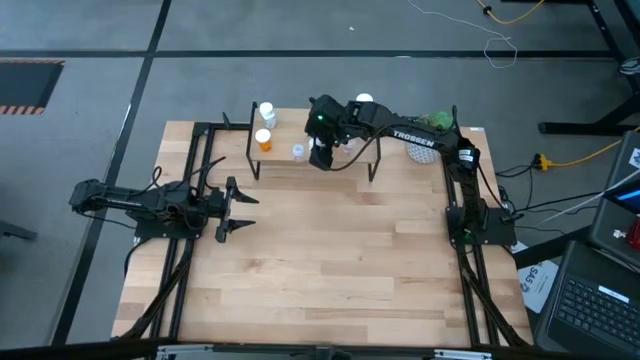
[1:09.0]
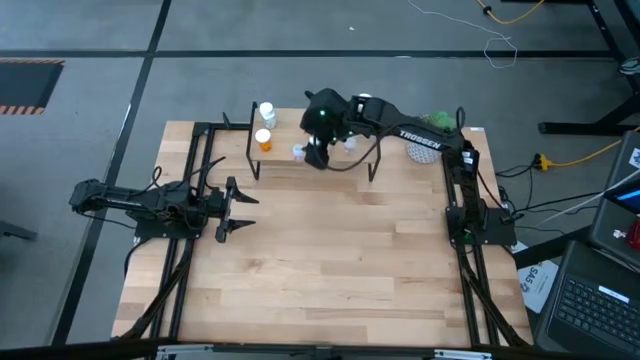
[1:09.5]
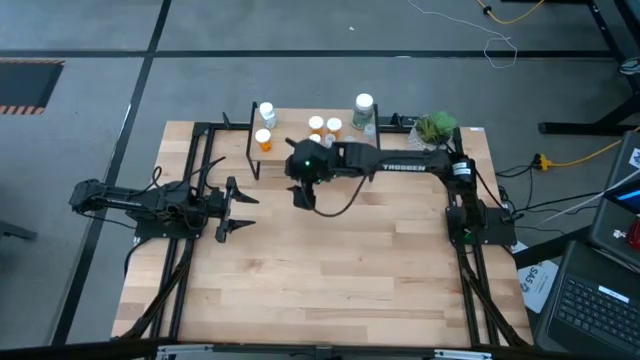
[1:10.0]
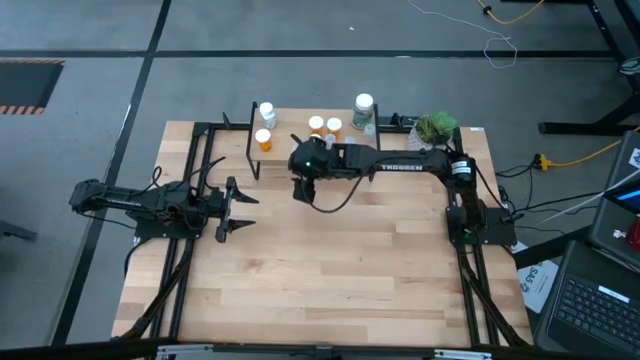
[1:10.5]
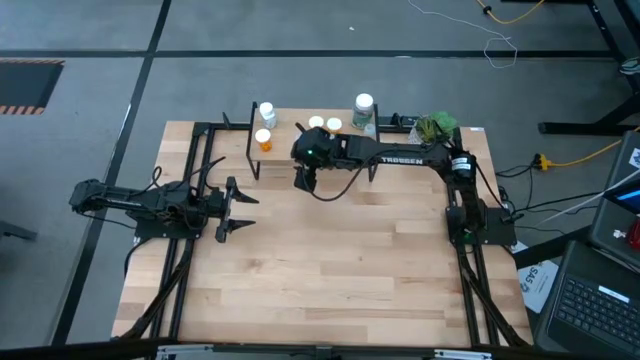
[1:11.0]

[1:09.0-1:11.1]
Task: Pick and place medicine bottles onto shelf by color
Adjust the transparent medicine bottle on the shelf

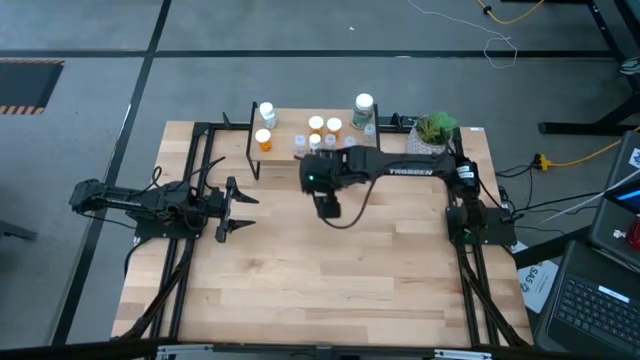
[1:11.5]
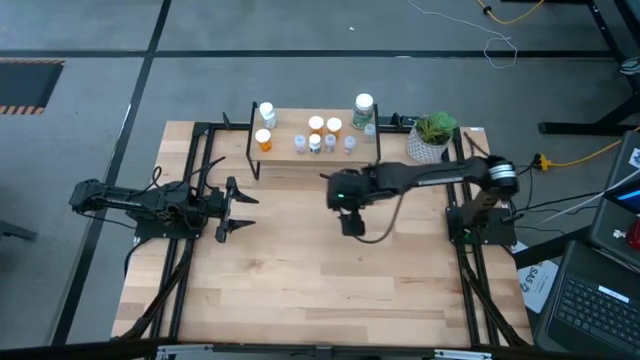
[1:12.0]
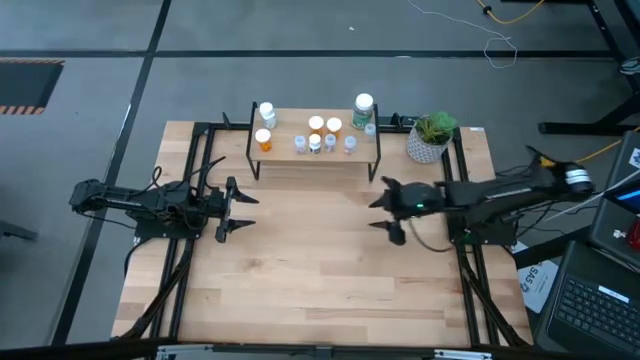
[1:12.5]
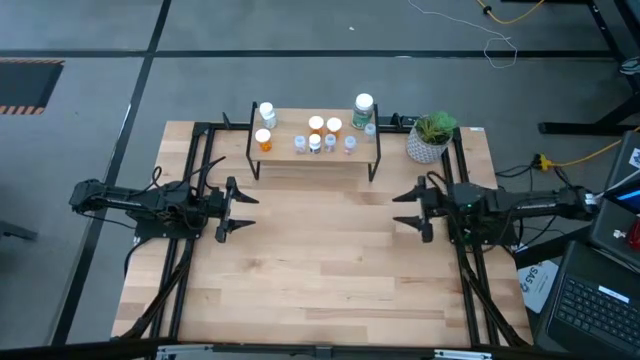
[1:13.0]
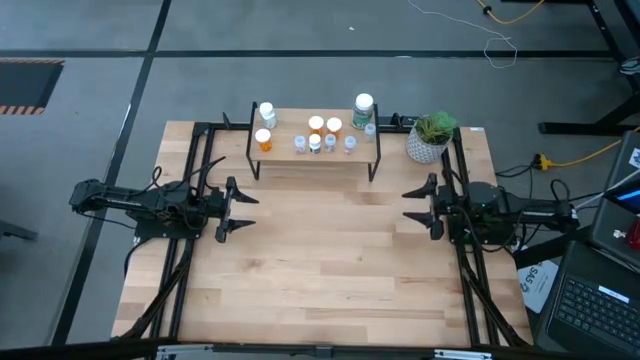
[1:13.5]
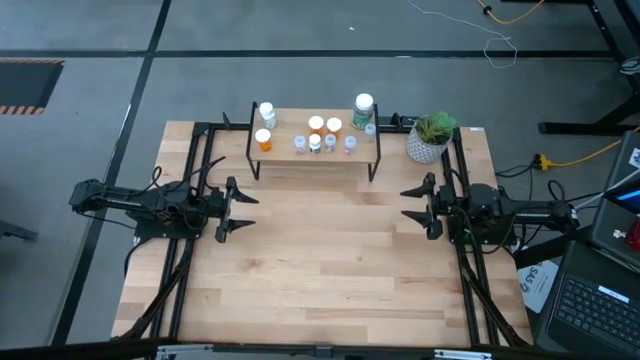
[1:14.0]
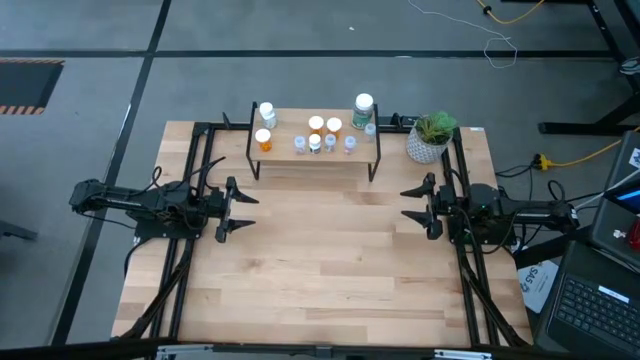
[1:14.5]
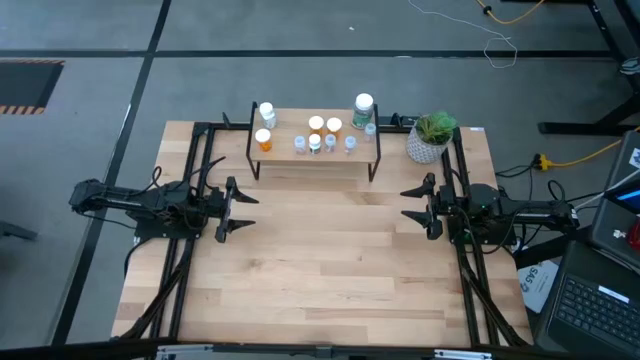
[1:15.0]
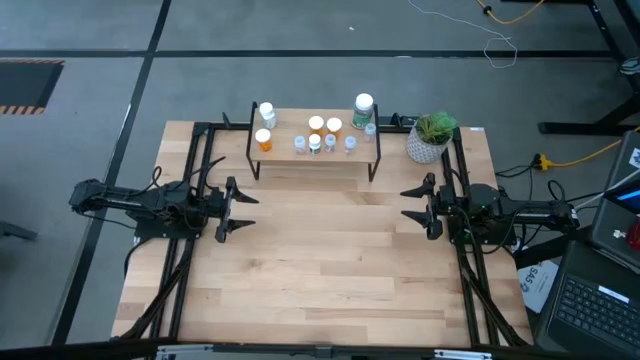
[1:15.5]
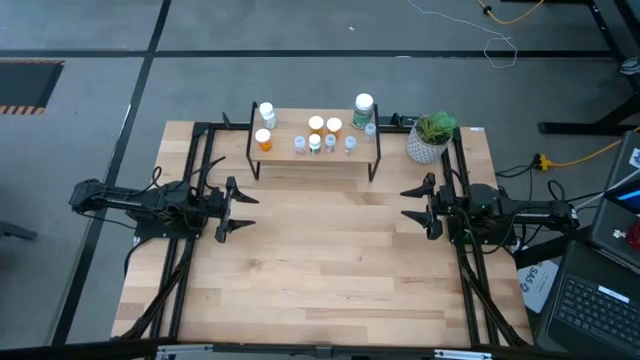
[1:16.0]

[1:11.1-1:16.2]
Return to Home Position

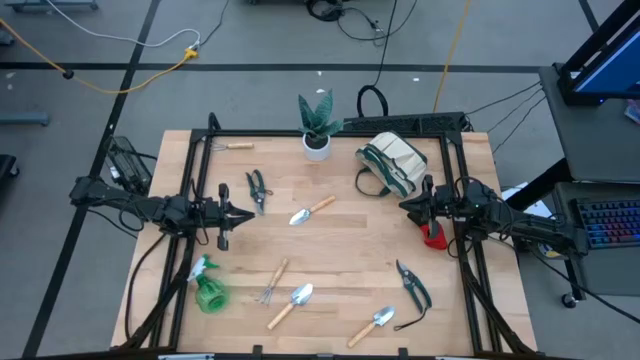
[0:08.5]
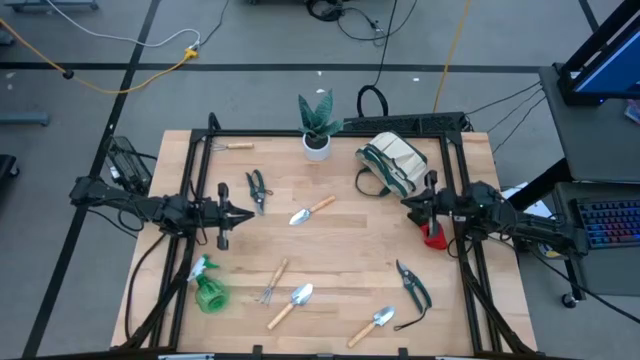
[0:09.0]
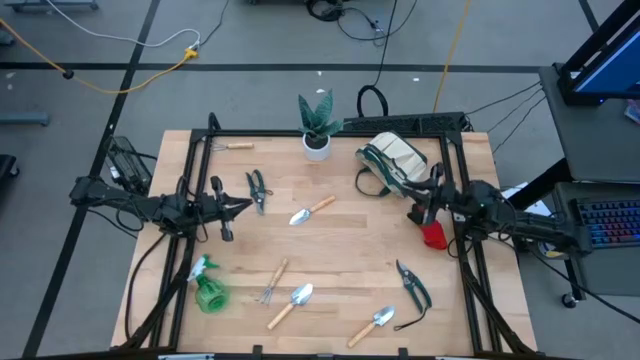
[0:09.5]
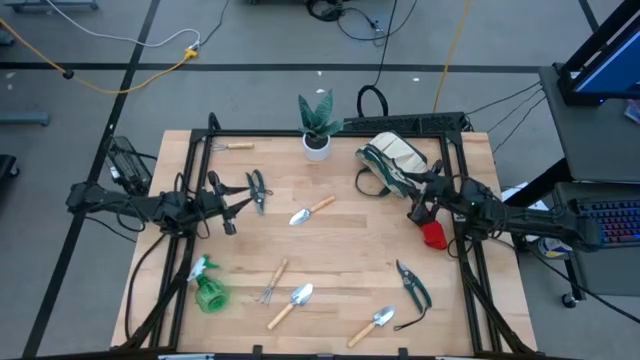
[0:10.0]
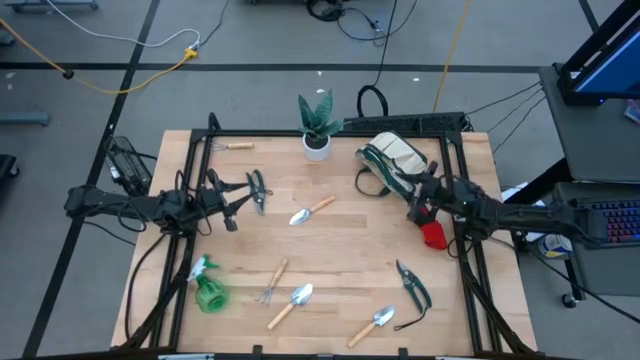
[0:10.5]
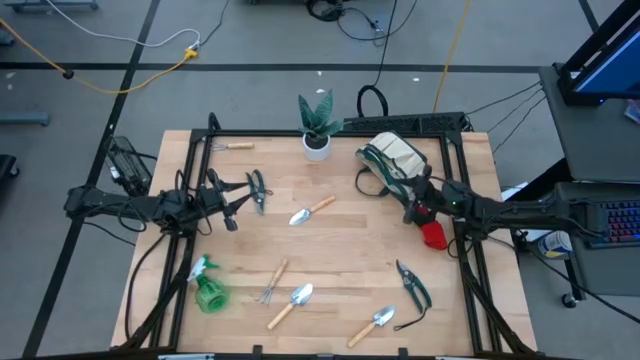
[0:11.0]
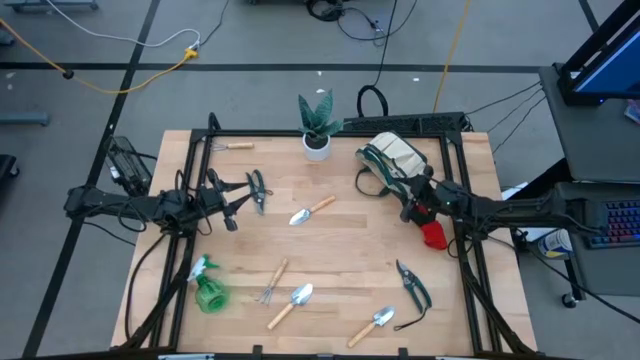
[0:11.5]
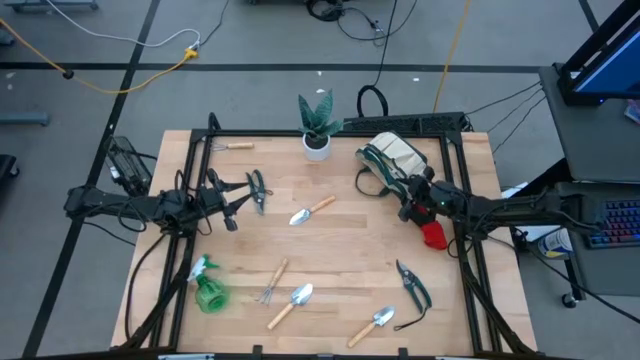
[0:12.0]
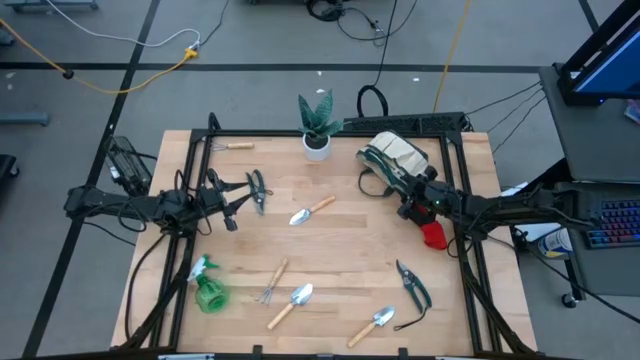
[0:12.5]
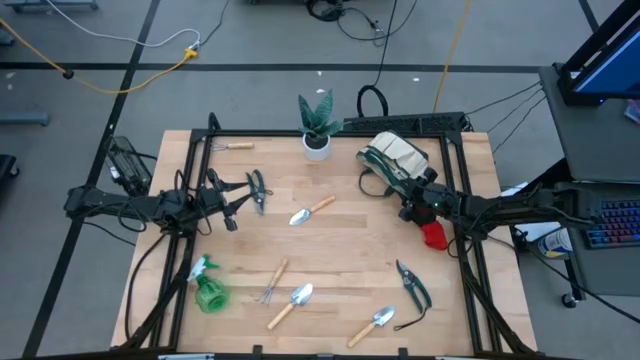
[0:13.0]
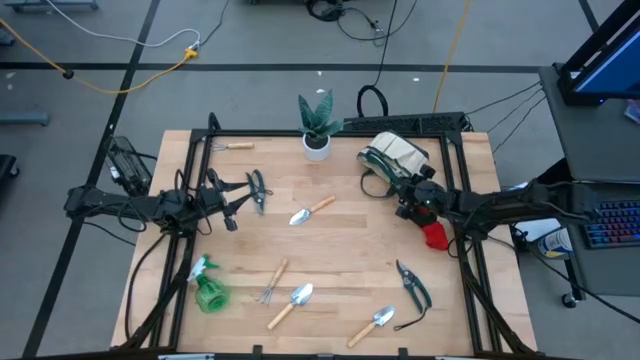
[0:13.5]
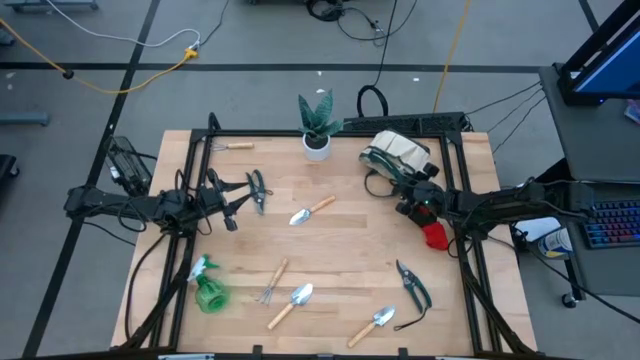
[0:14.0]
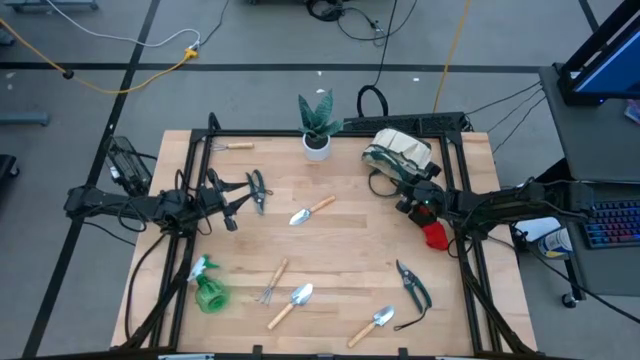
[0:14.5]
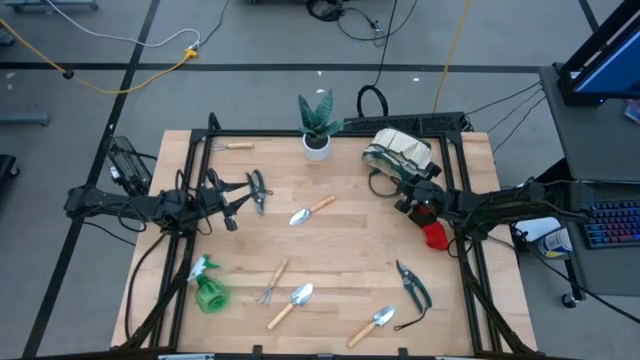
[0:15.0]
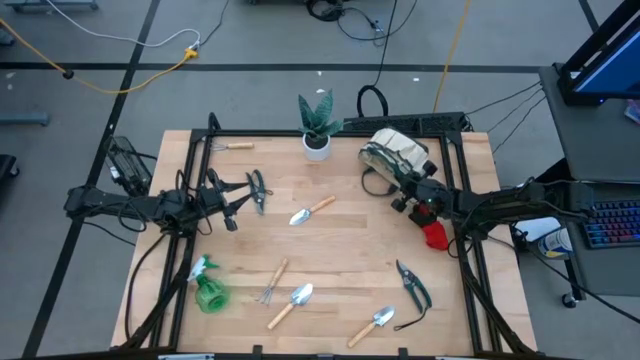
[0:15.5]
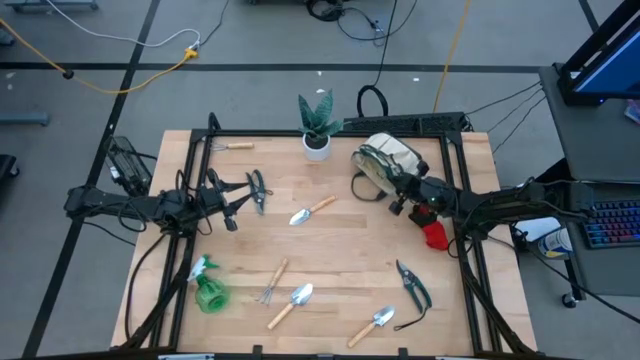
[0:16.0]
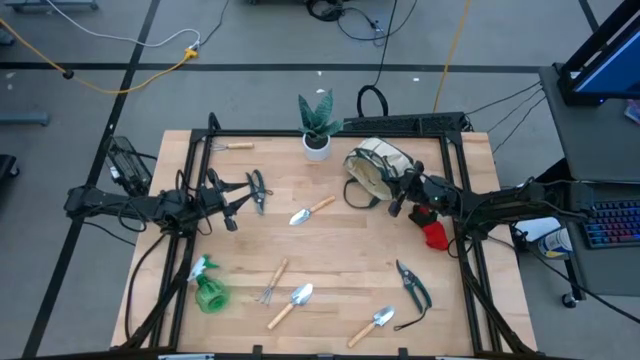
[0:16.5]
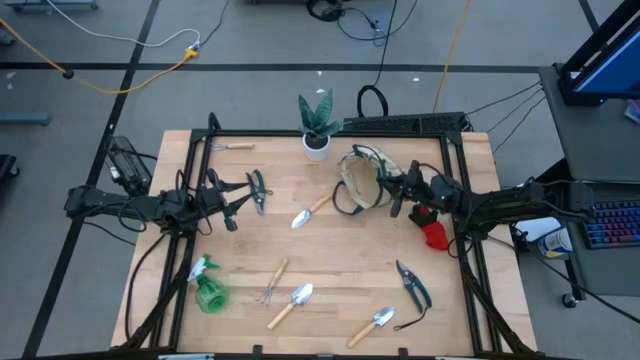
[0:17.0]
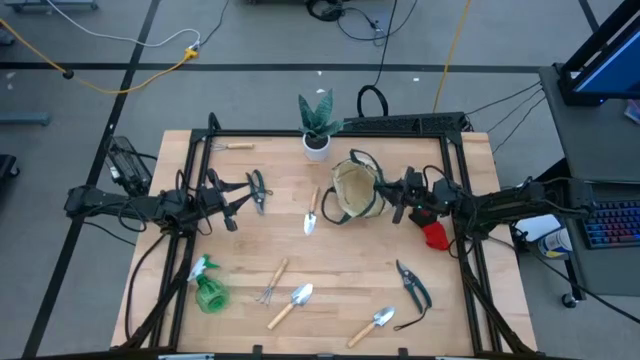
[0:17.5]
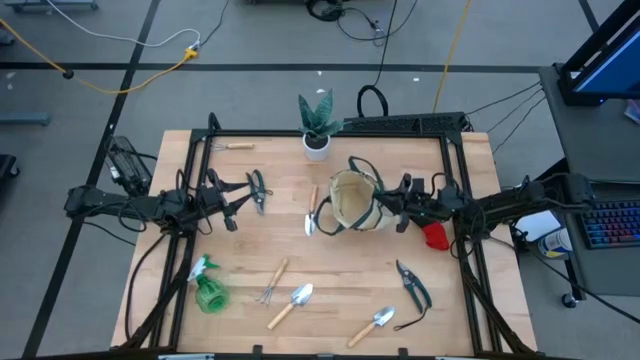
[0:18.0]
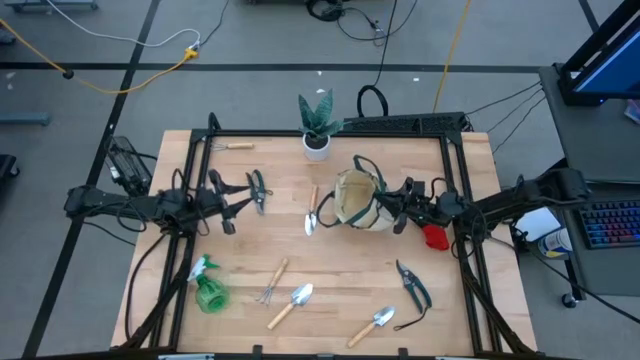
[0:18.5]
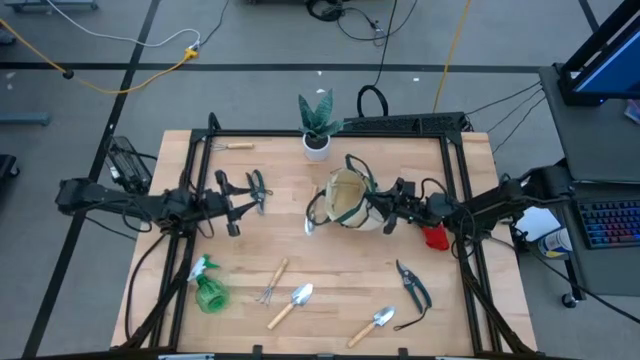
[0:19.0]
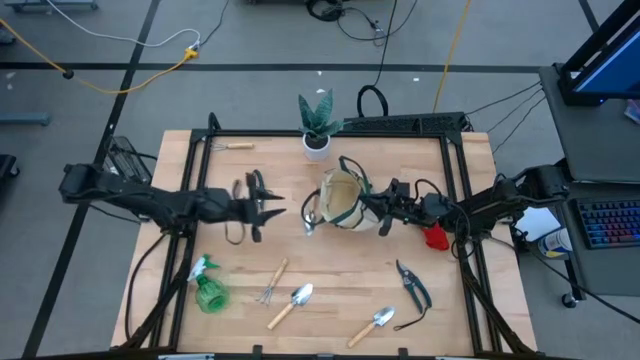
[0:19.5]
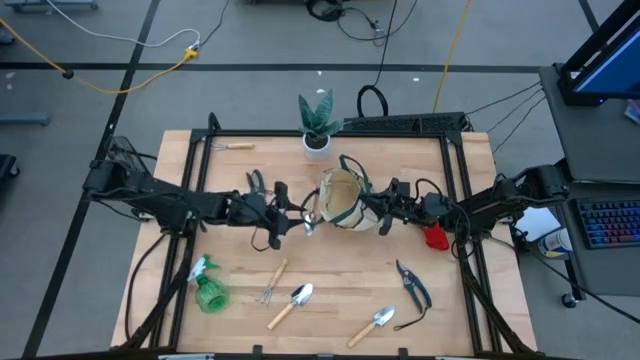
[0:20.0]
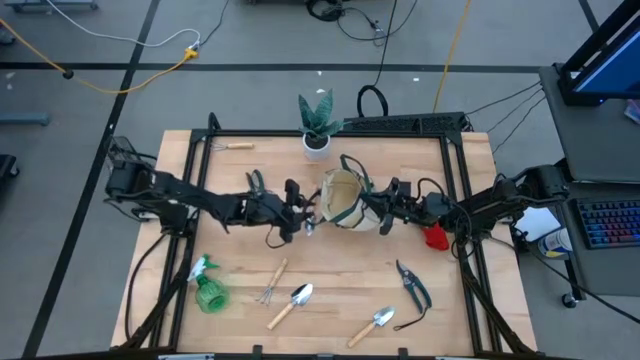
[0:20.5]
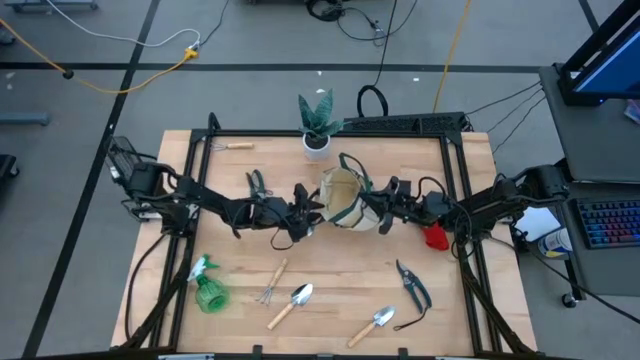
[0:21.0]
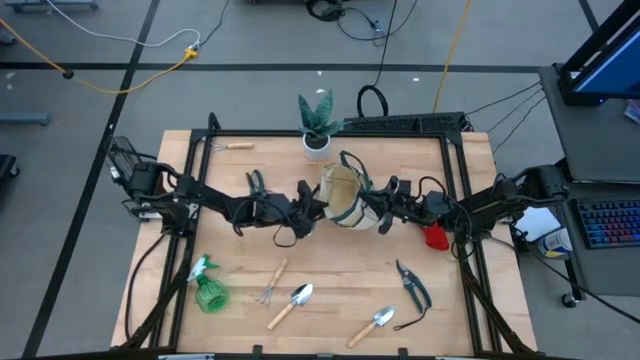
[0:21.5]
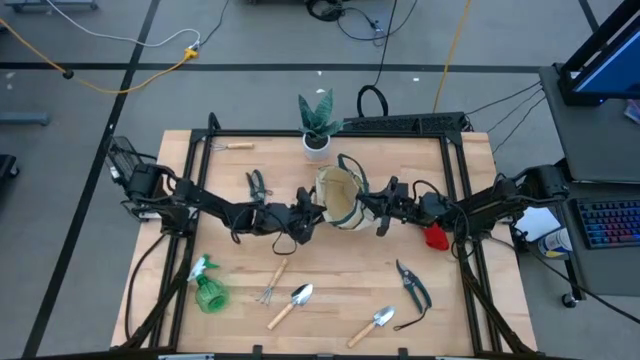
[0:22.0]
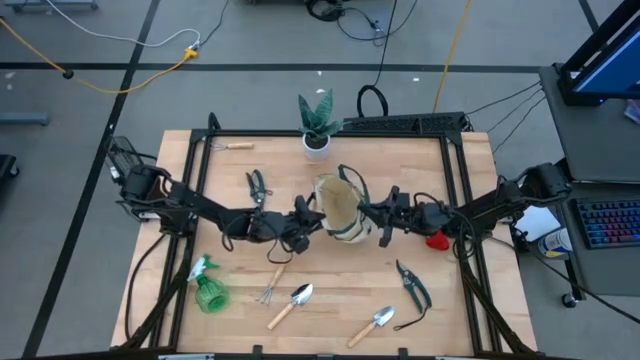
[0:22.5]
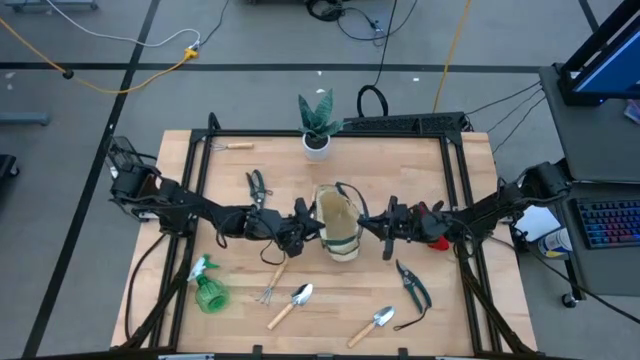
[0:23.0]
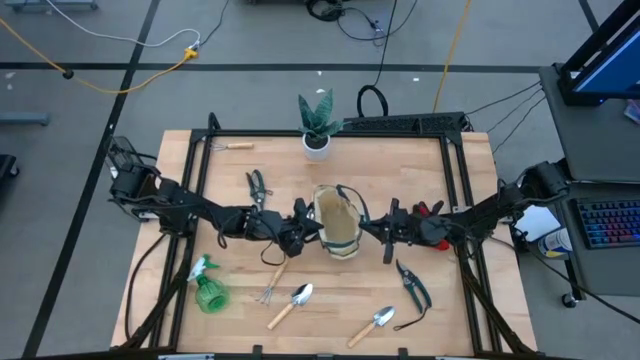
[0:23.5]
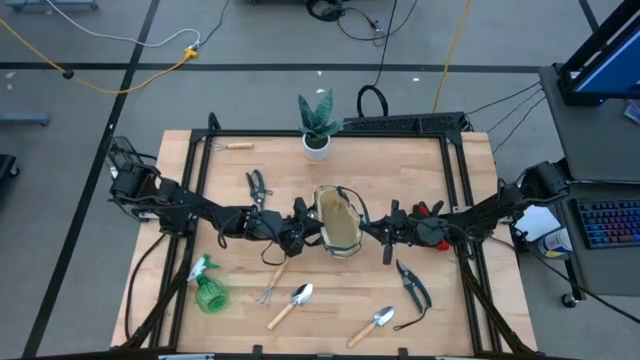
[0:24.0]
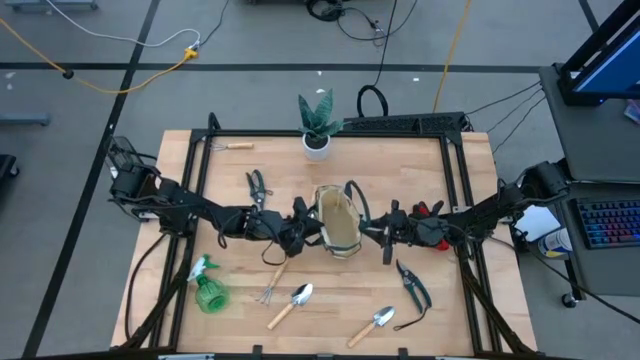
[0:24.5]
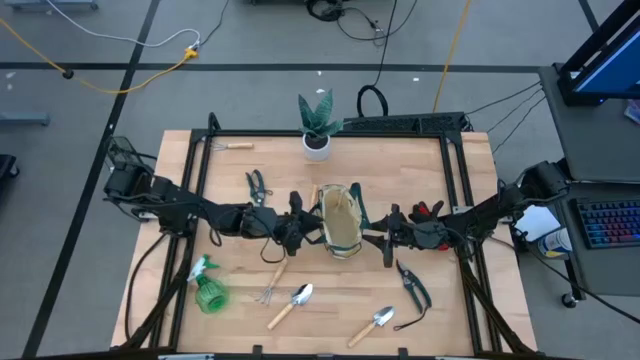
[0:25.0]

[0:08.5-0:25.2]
Task: Pick & Place Garden tools in Gardening bag
Prepare the gardening bag
